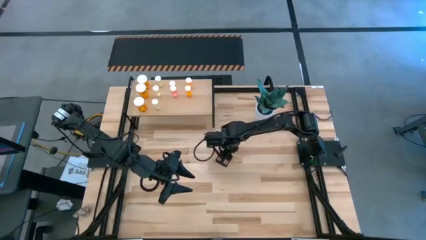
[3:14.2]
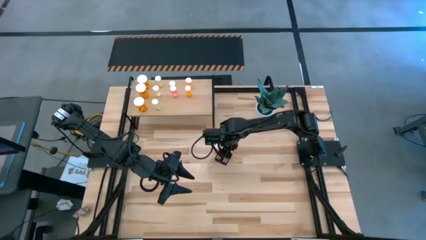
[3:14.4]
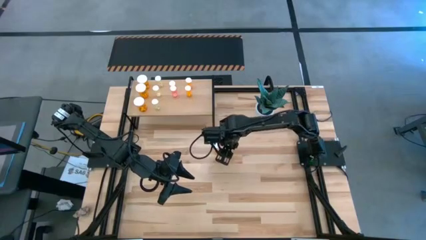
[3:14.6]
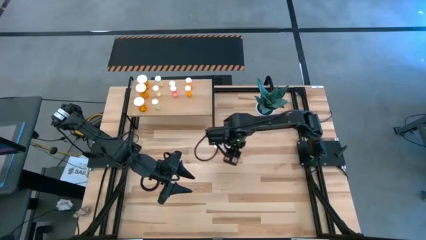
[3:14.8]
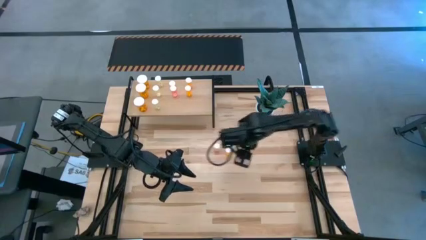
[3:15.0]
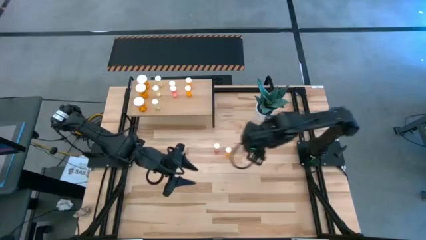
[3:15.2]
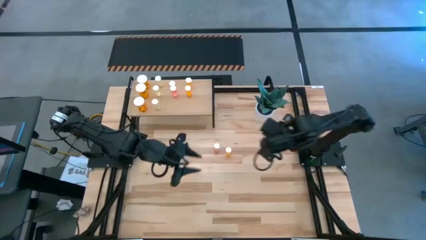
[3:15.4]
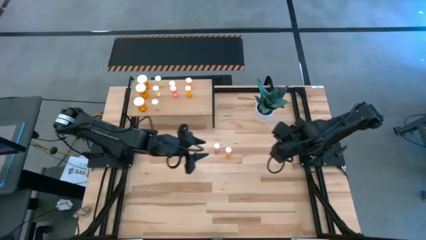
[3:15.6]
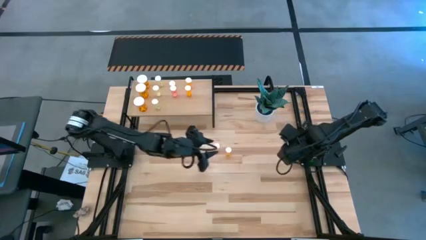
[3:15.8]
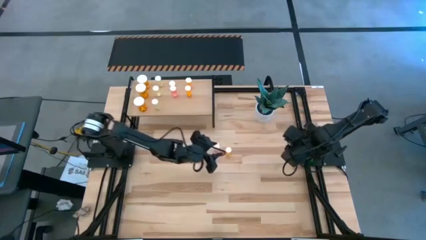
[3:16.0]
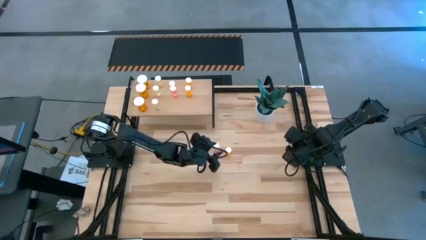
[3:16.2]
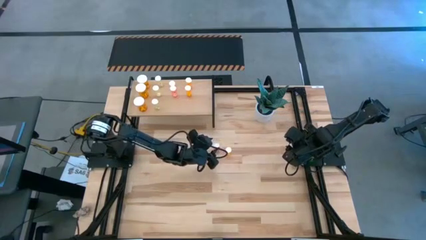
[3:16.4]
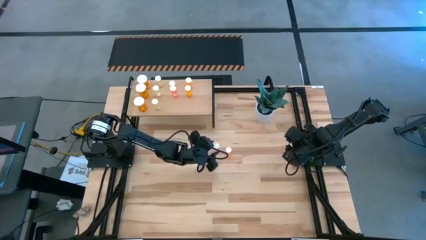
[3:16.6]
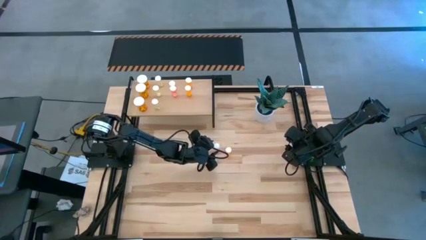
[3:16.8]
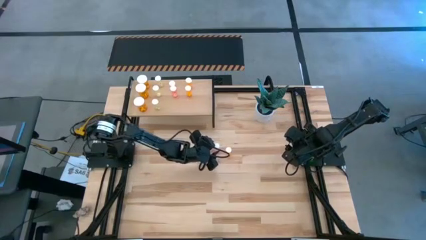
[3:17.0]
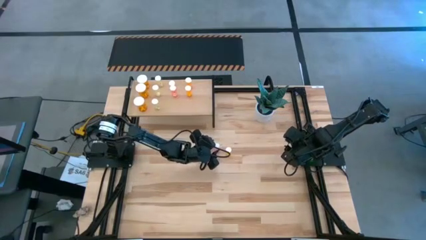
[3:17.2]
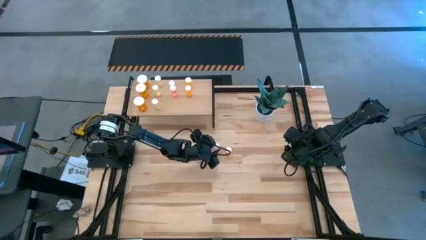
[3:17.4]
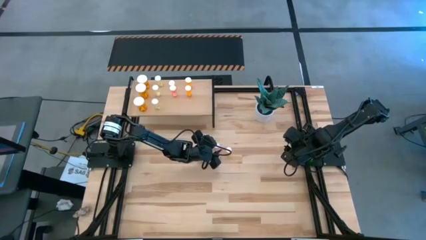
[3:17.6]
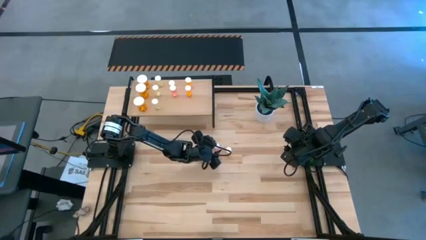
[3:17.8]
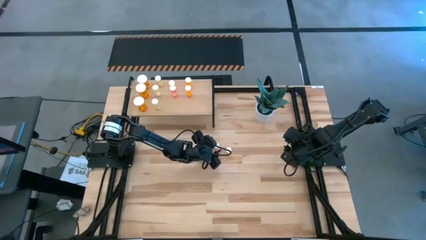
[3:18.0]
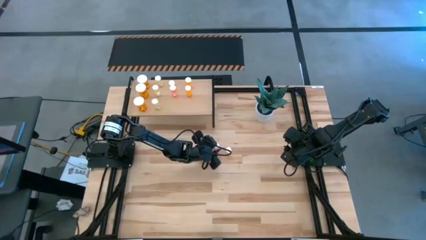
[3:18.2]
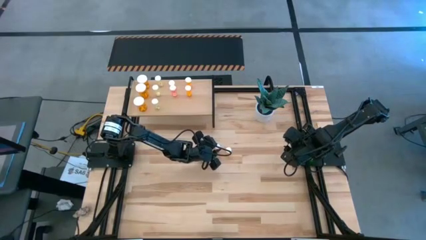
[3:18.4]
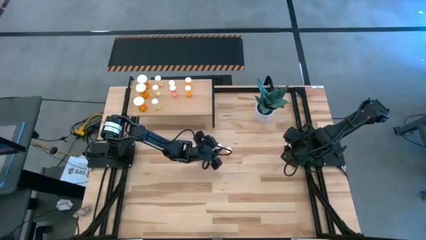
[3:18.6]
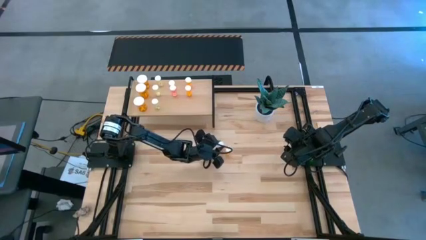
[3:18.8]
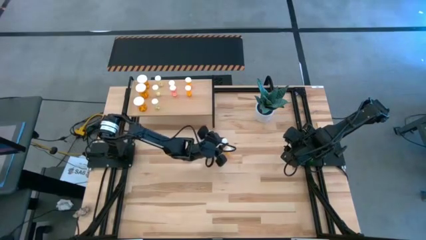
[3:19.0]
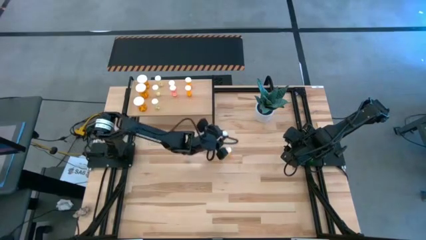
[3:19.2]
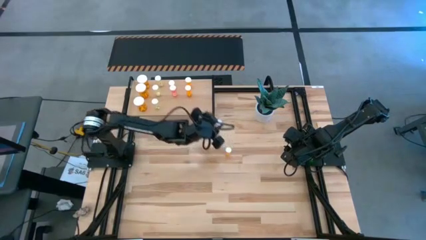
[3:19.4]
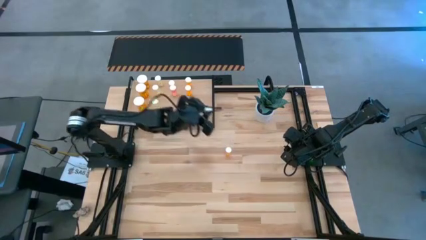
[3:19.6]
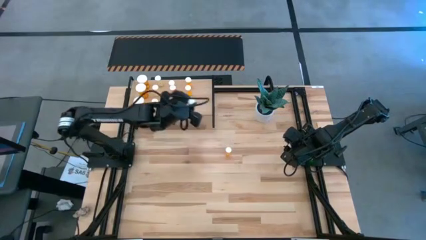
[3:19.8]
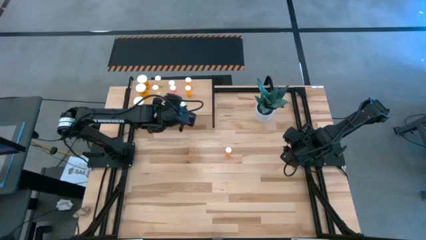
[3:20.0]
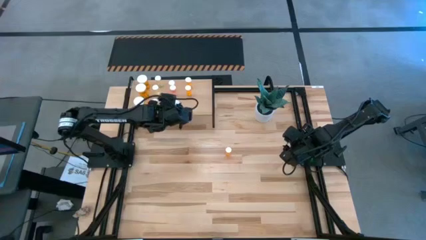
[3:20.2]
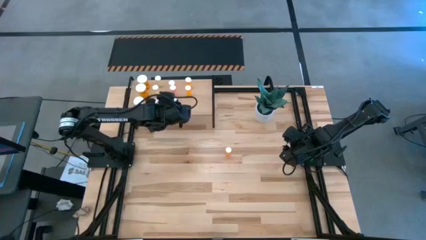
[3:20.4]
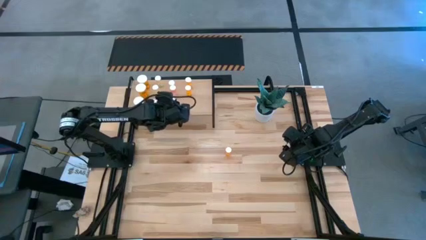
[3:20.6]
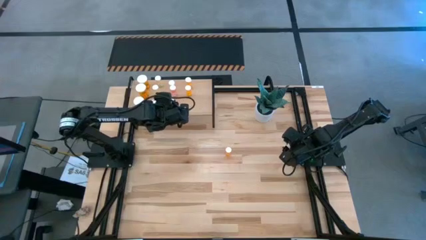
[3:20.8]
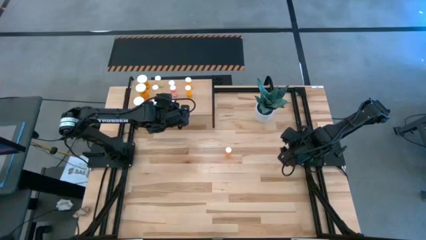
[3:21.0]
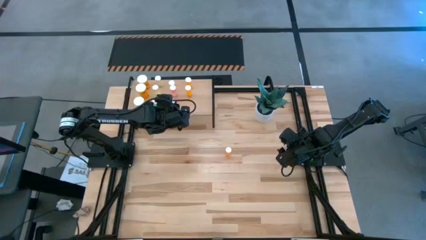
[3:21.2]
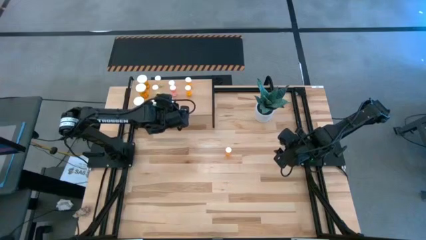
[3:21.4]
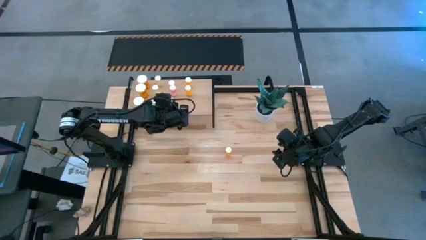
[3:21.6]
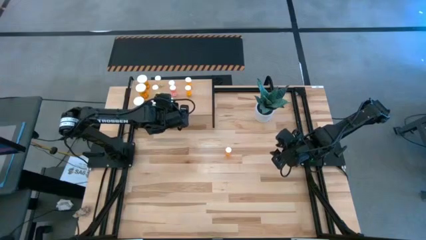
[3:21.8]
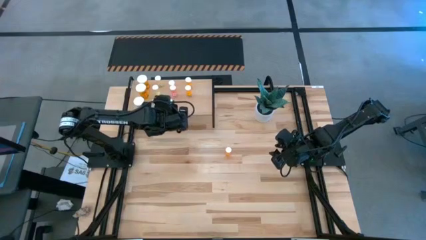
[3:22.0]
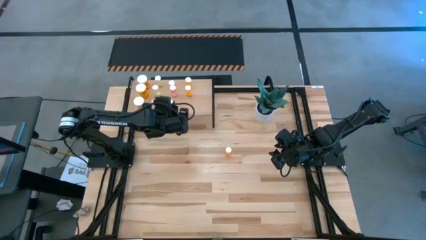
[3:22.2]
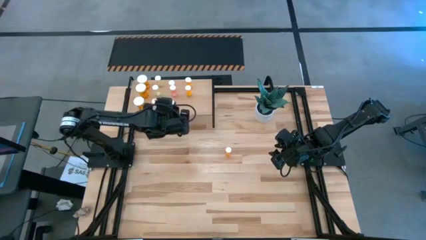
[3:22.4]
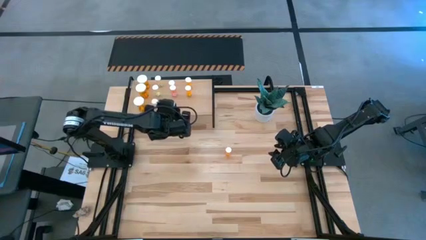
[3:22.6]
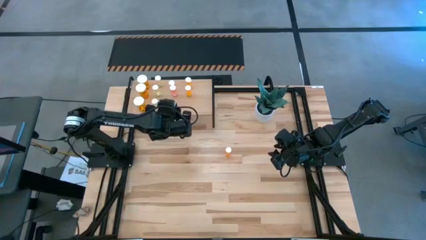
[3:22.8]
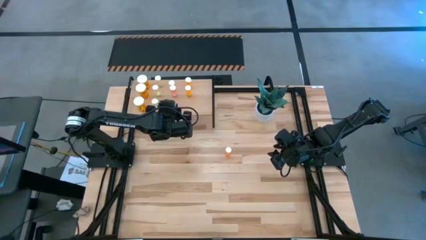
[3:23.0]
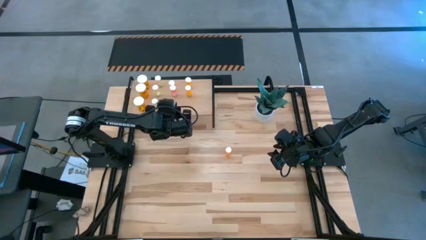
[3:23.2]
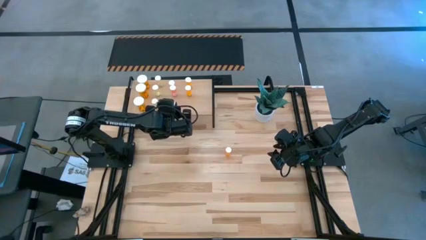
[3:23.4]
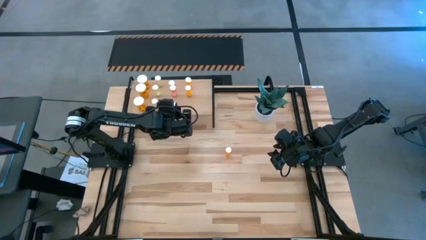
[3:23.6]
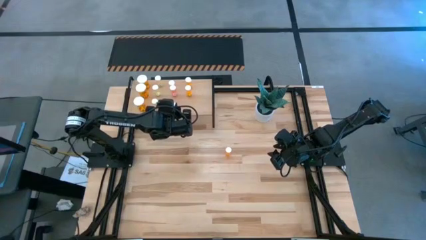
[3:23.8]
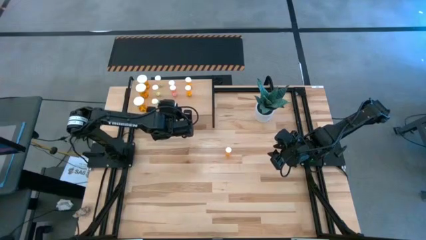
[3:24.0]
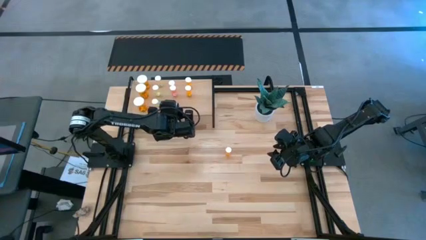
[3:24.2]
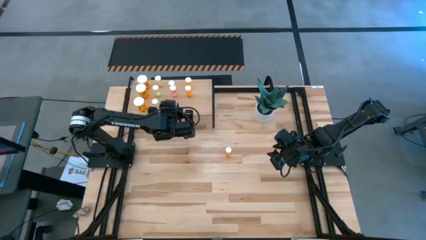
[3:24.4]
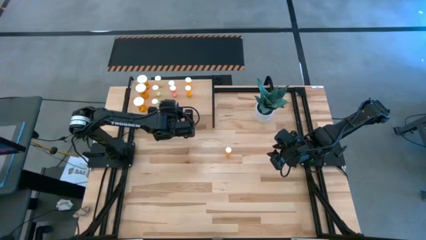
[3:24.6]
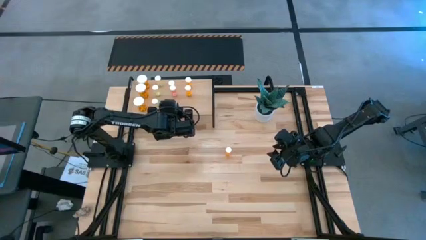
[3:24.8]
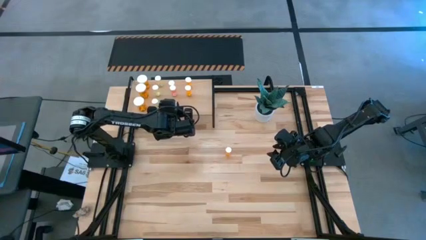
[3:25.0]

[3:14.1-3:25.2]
Task: Pick and place medicine bottles onto shelf by color
Put the pink pill bottle on the shelf aligned with the other pink pill bottles
